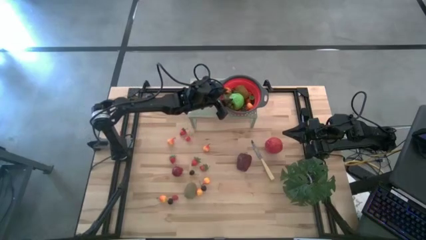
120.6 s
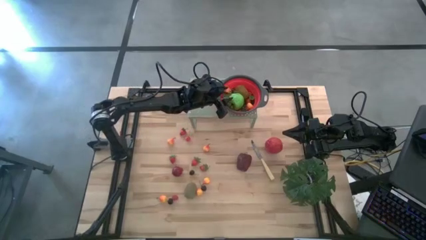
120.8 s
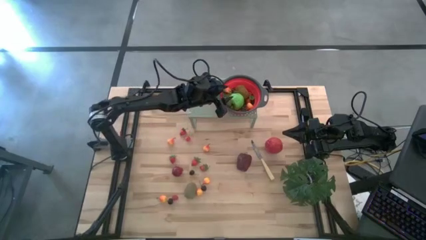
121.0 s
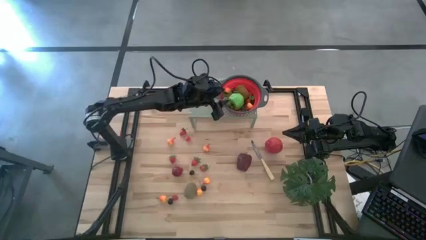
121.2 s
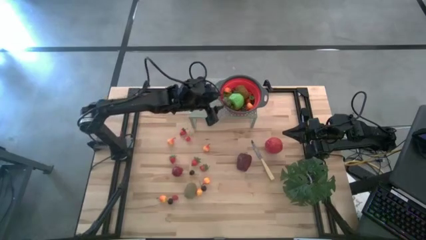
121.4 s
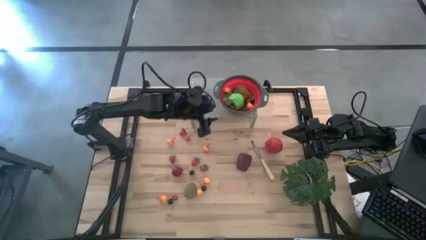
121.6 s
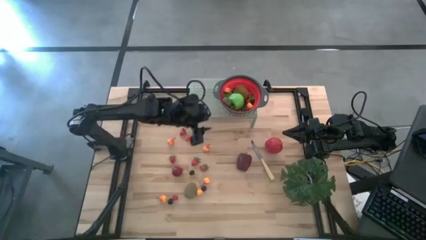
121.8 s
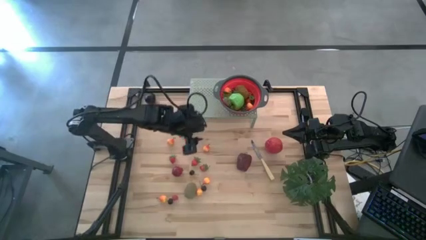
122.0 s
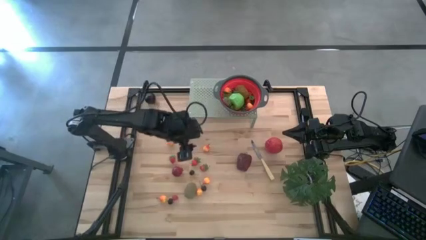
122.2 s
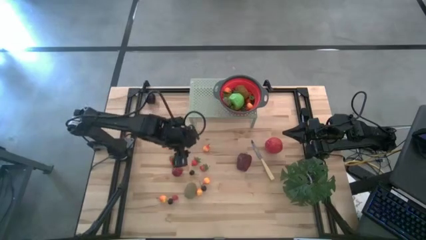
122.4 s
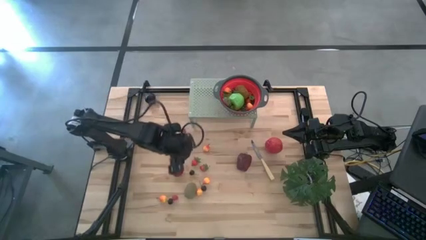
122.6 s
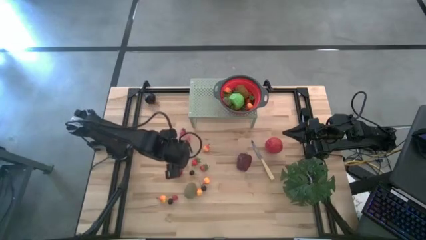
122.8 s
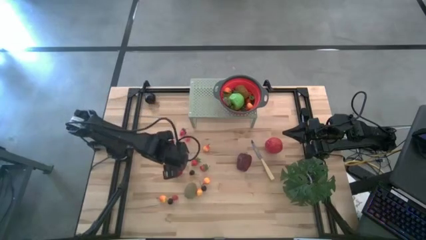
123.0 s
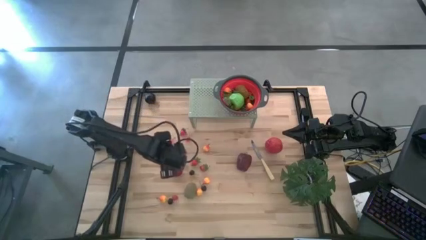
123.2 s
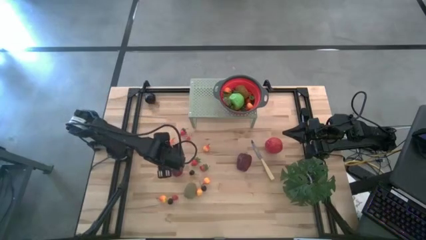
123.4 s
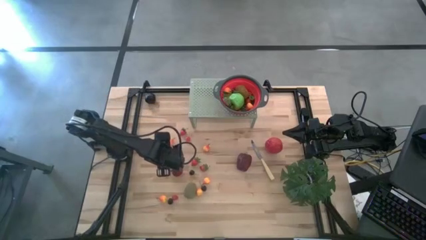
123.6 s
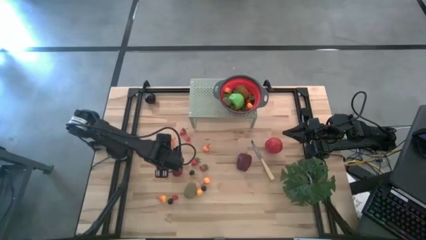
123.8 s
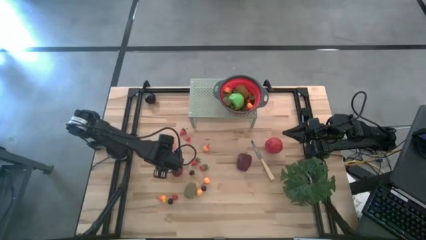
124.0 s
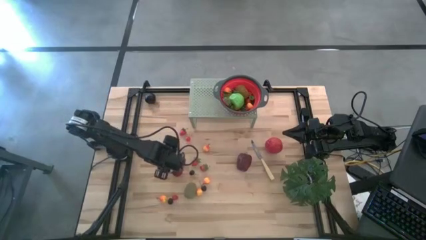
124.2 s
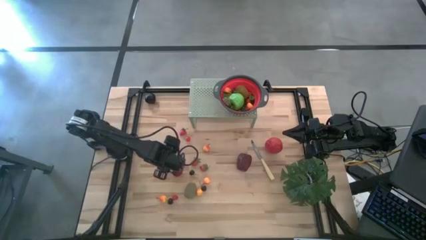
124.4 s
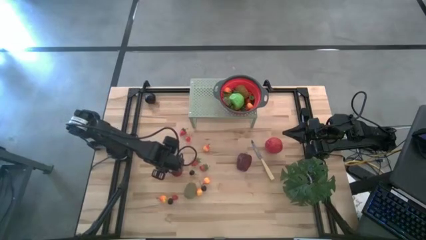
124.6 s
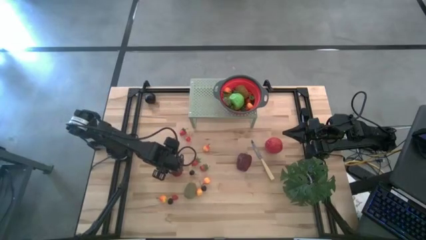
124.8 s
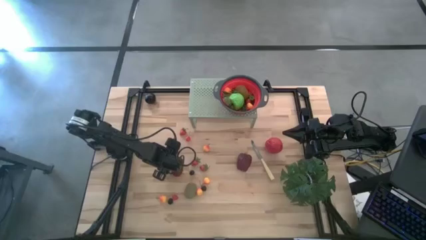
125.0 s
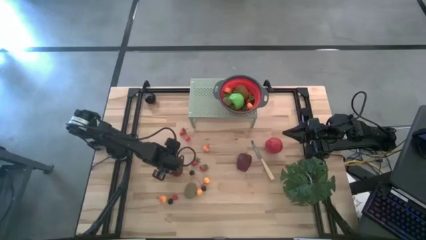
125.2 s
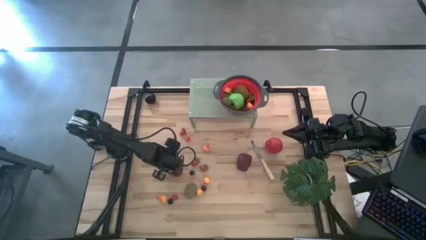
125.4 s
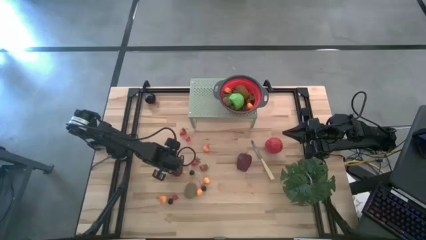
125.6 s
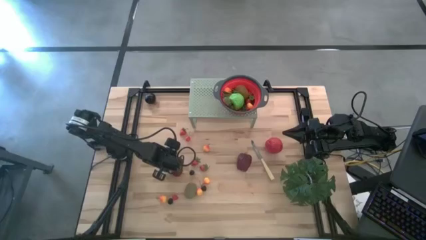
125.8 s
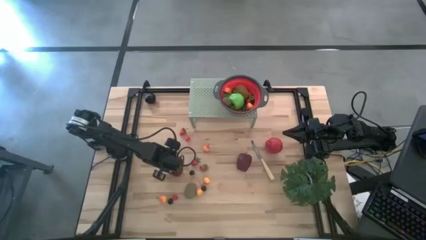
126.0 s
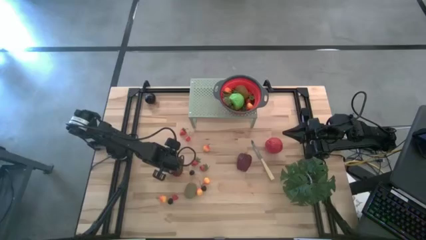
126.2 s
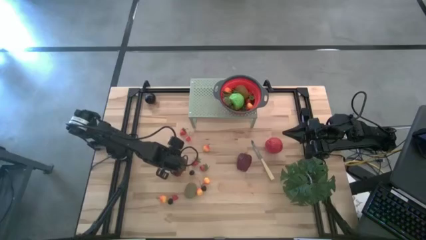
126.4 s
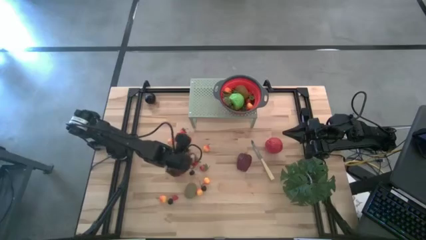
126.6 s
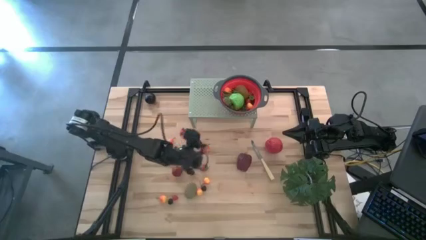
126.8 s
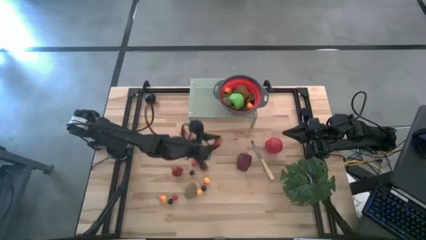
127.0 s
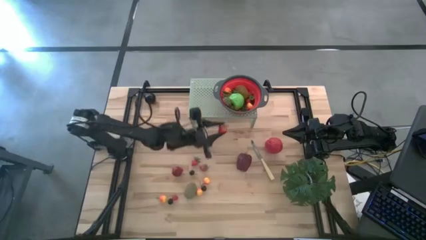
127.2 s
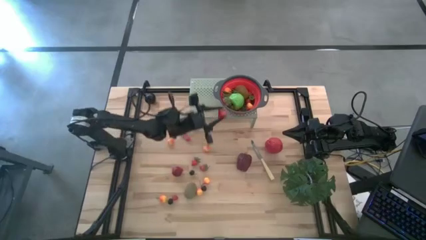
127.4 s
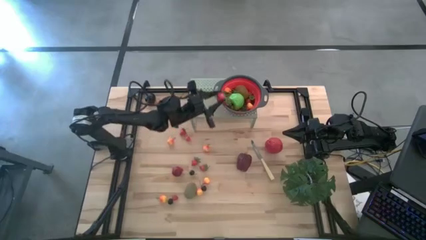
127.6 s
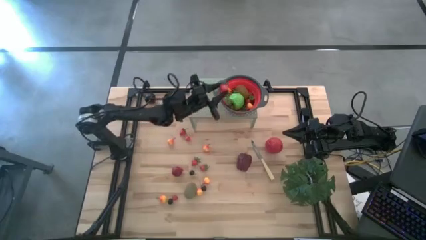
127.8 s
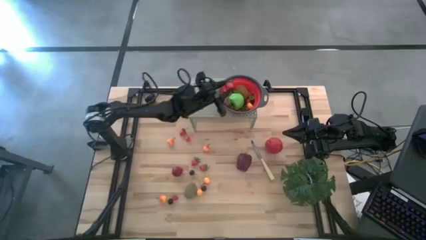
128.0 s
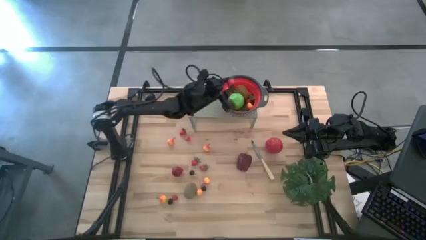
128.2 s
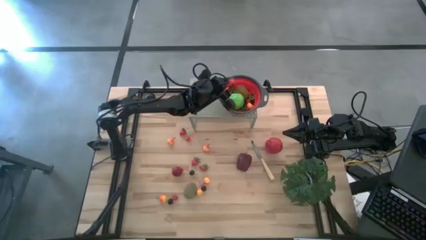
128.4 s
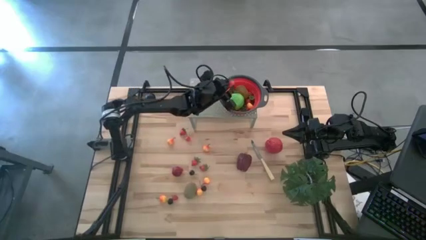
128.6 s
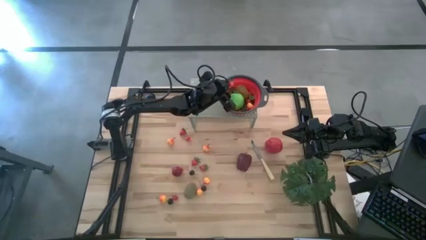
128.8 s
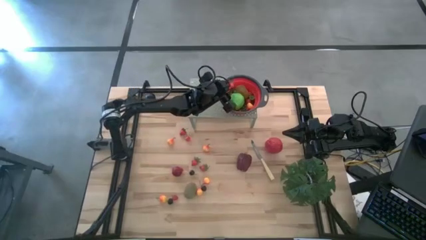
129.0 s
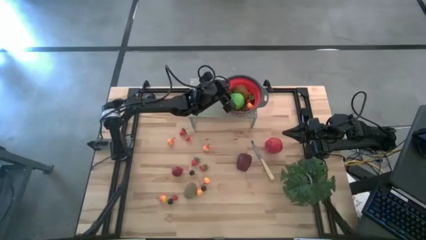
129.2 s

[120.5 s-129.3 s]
Task: Pick & Place Fruit
Put the red strawberry into the black strainer bowl on the shelf

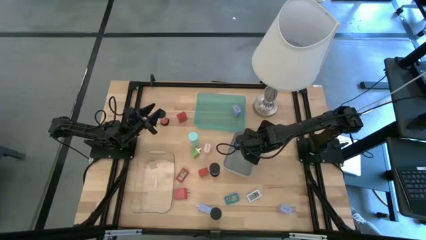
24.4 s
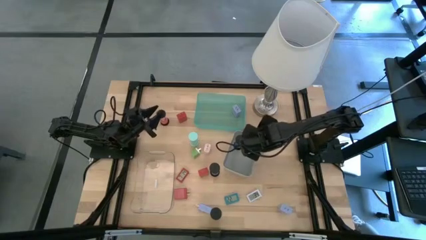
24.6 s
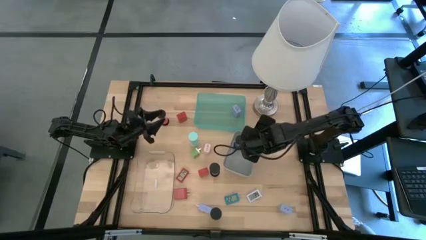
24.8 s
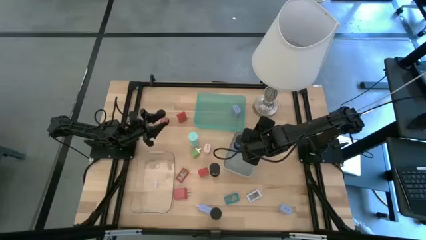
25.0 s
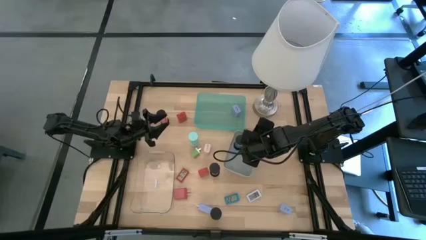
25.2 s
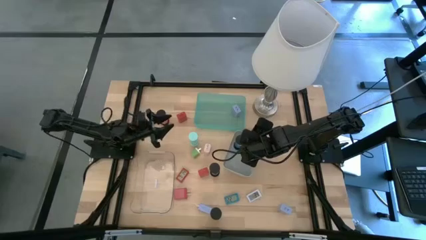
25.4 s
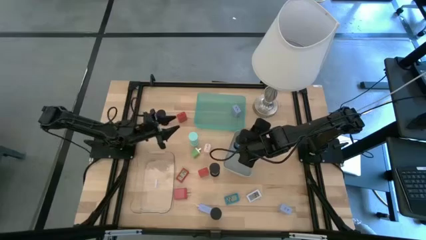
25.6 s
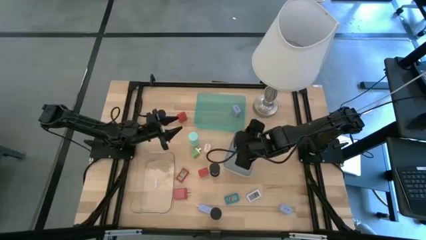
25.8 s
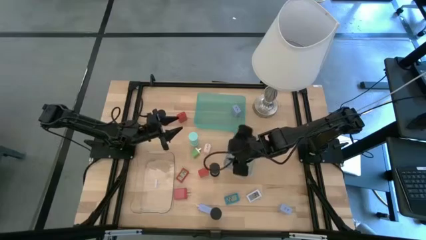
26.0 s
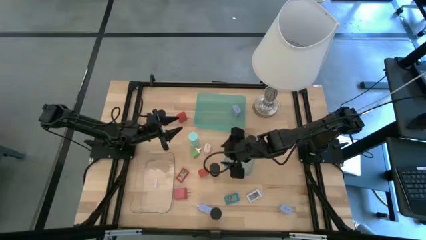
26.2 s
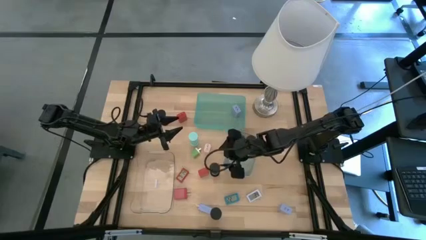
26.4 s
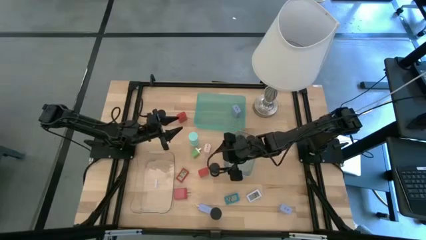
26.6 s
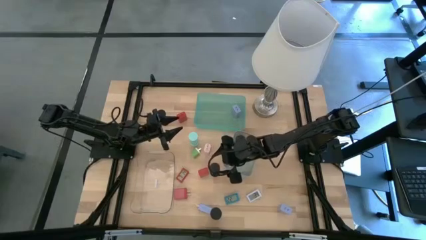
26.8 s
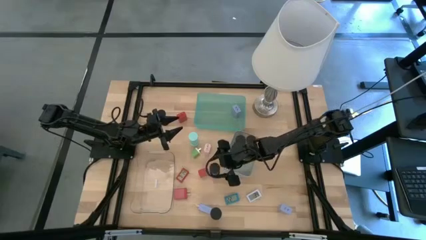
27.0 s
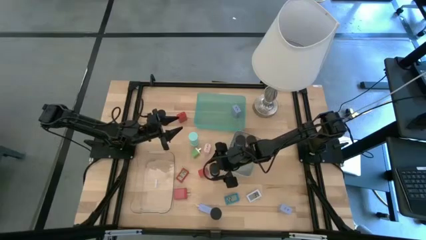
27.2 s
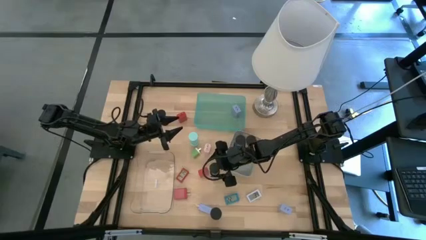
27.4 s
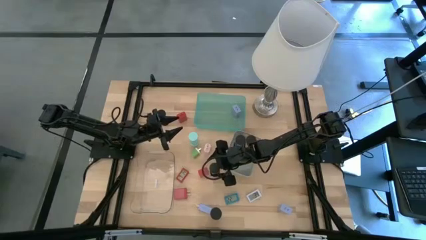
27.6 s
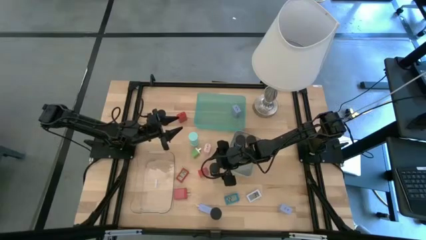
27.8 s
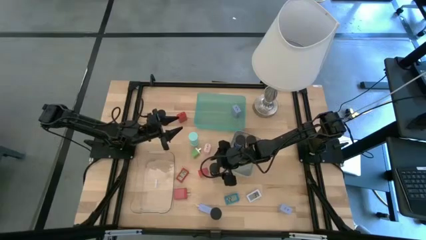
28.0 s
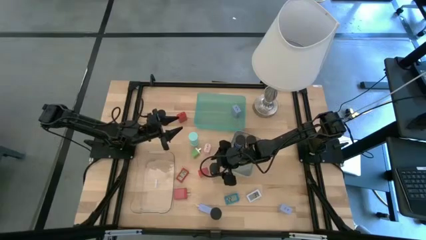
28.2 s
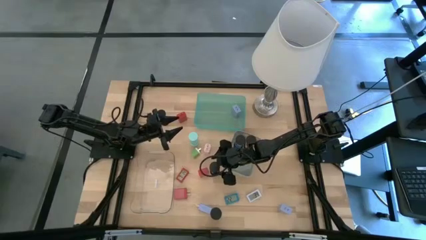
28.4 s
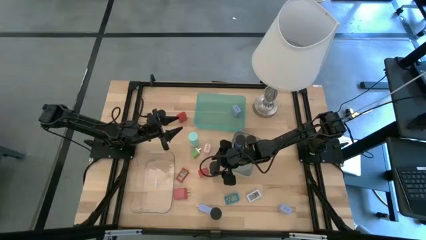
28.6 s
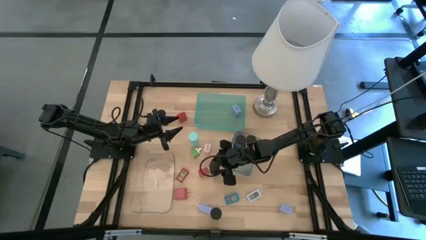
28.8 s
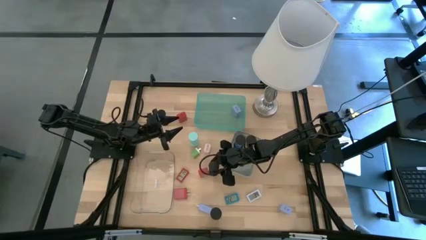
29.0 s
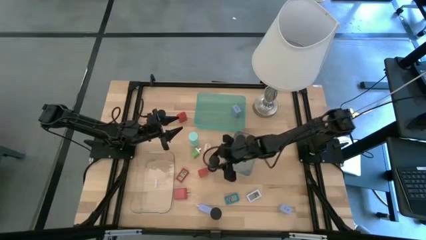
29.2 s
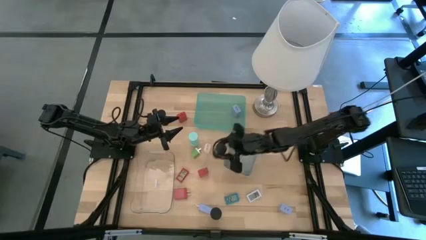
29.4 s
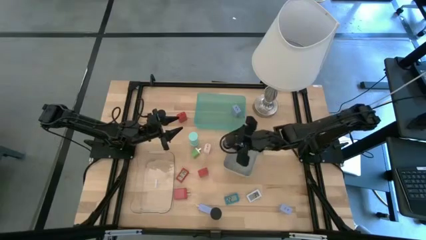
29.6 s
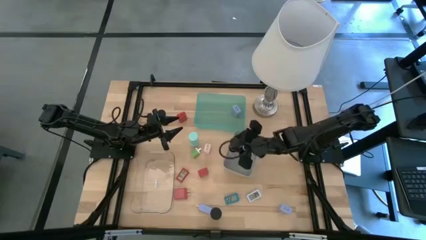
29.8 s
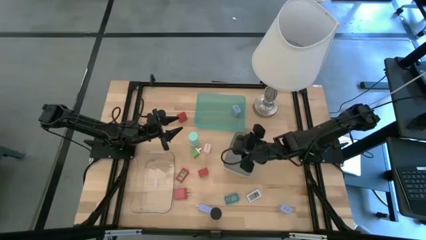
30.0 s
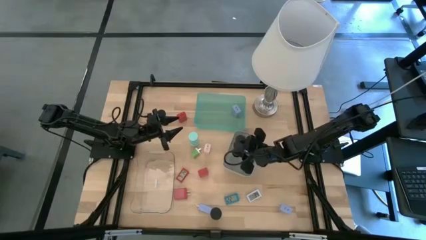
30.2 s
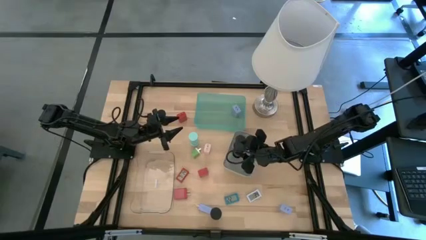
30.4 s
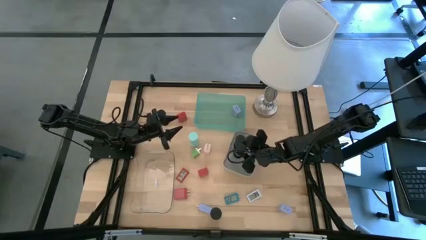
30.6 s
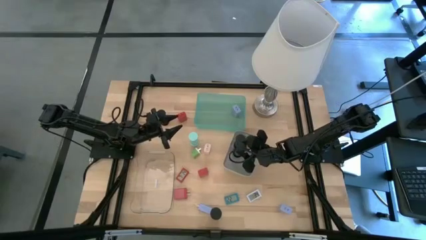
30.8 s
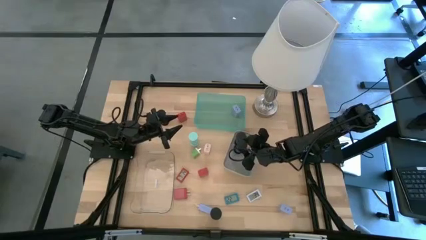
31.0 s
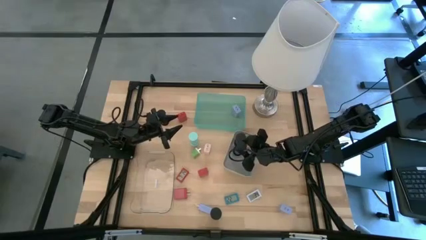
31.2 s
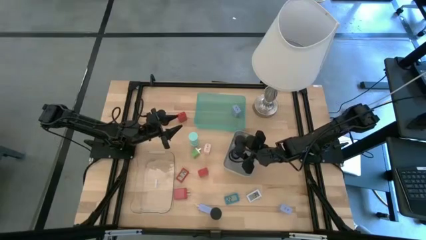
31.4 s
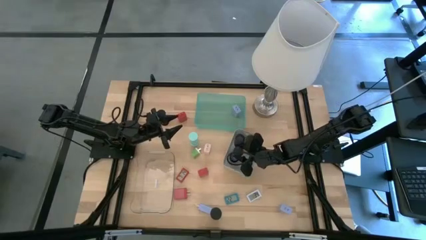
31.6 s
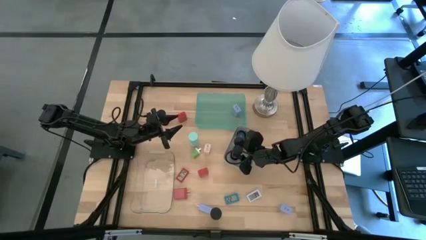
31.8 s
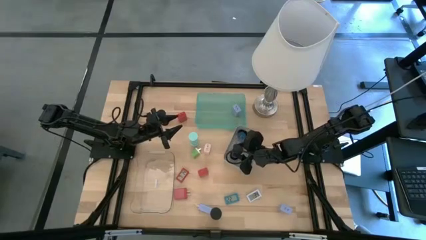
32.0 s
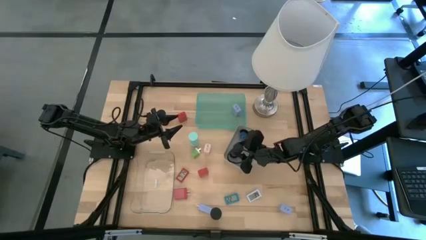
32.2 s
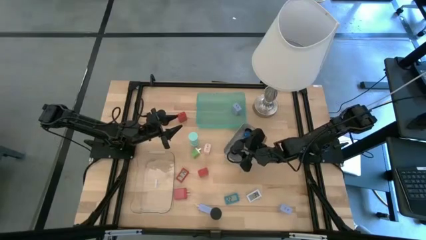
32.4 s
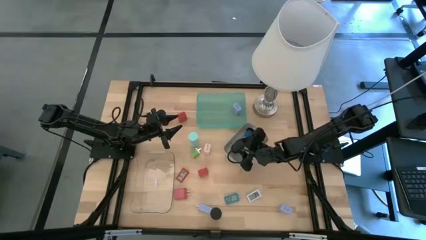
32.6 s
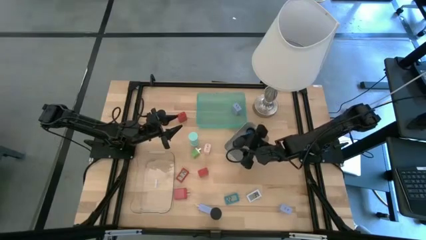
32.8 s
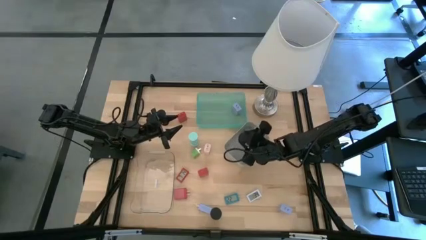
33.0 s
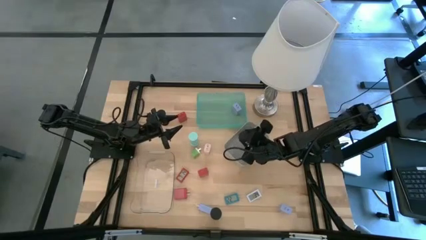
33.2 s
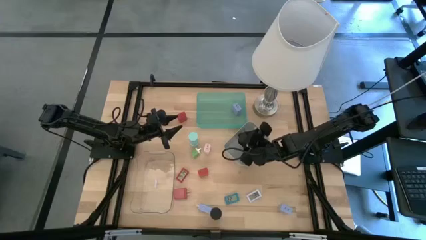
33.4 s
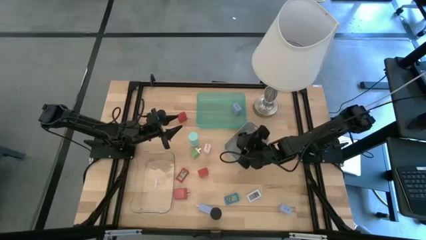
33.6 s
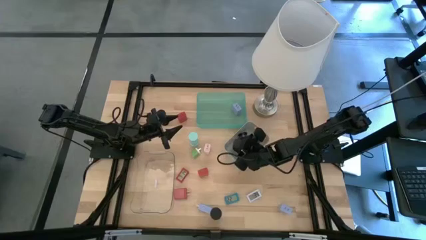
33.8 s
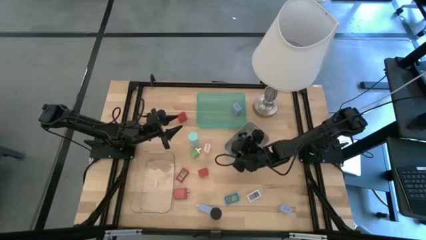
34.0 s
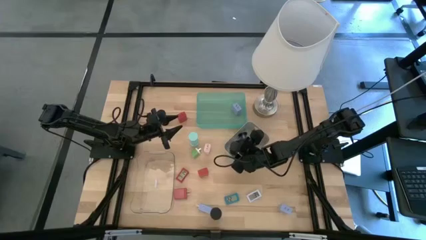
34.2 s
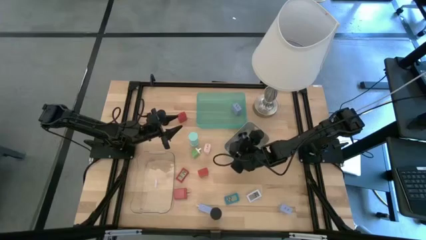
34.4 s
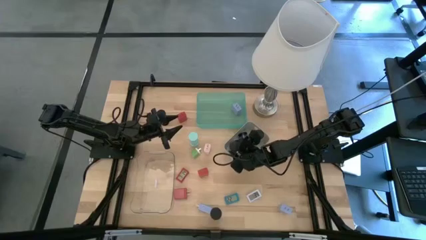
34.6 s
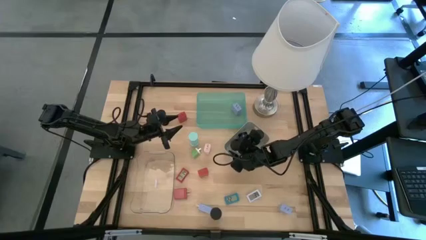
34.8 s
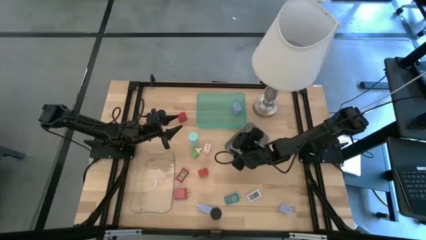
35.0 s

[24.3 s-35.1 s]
Task: Pick & Place Office items
Put the blue hourglass into the gray bin
